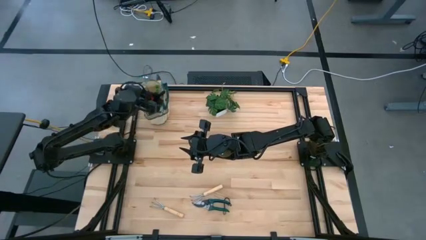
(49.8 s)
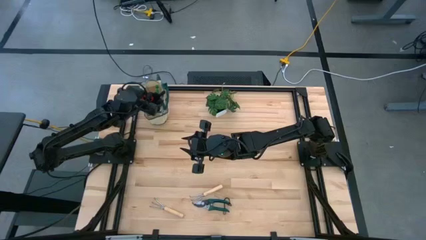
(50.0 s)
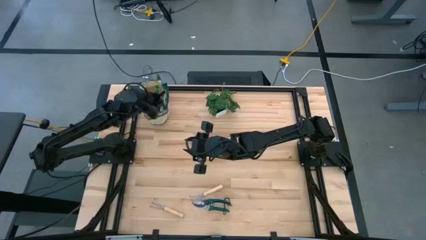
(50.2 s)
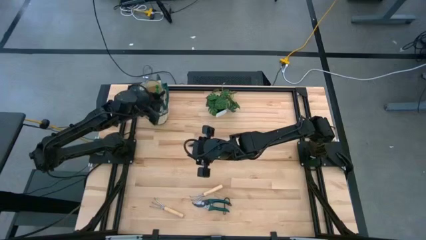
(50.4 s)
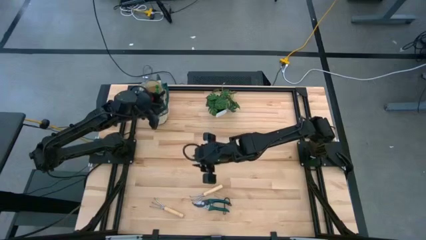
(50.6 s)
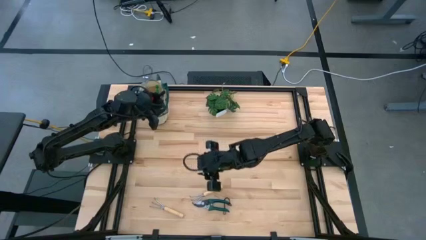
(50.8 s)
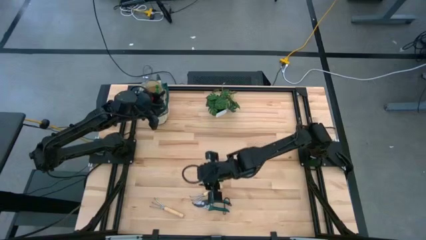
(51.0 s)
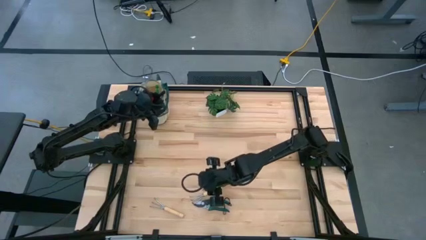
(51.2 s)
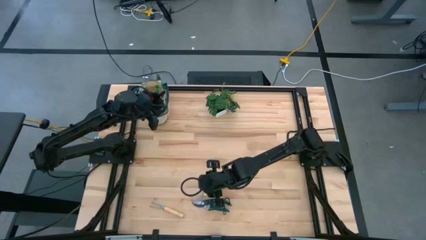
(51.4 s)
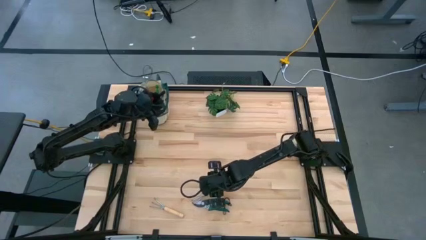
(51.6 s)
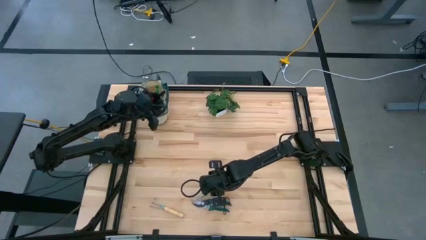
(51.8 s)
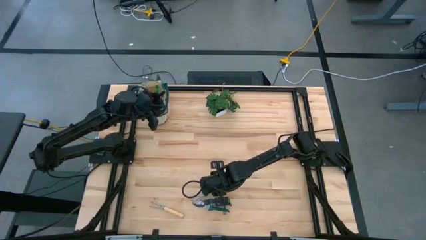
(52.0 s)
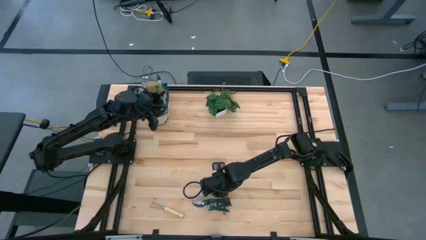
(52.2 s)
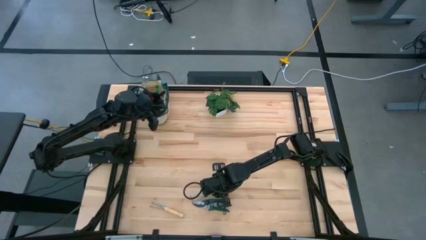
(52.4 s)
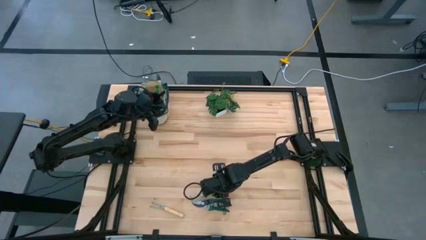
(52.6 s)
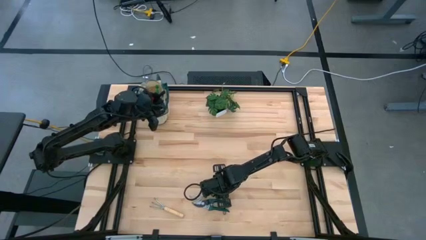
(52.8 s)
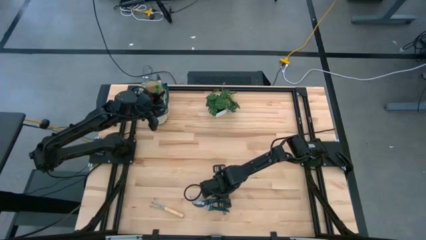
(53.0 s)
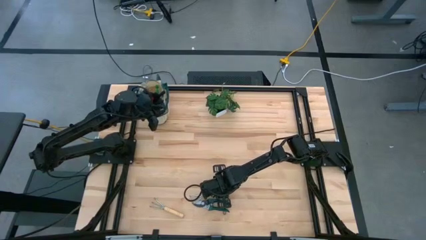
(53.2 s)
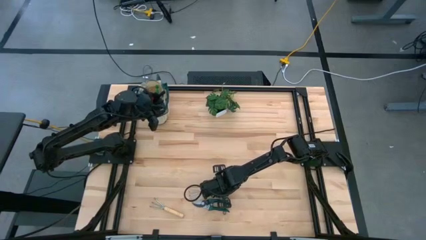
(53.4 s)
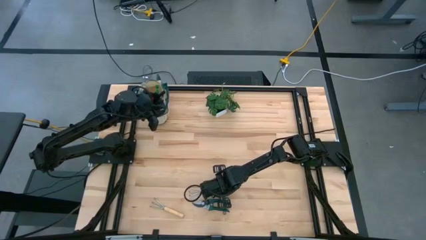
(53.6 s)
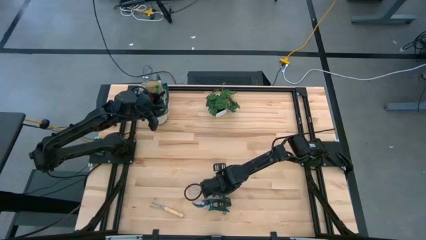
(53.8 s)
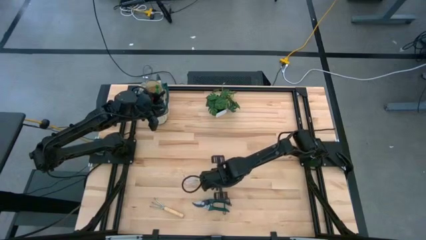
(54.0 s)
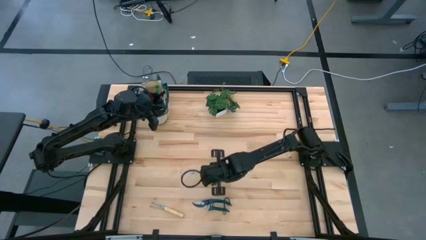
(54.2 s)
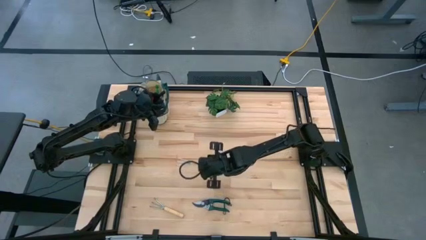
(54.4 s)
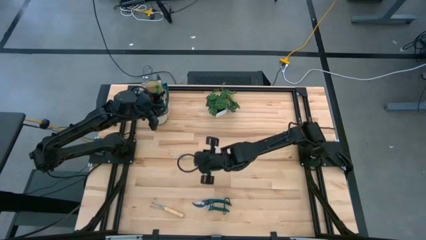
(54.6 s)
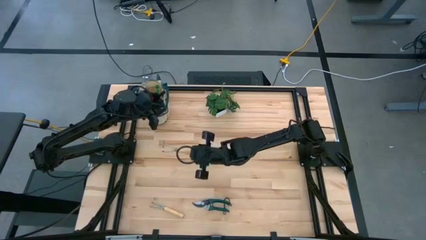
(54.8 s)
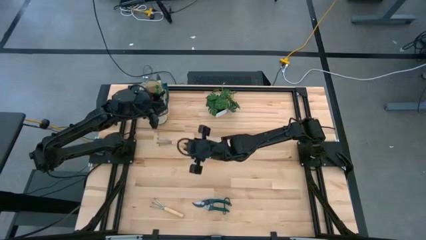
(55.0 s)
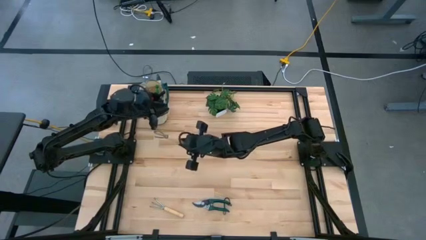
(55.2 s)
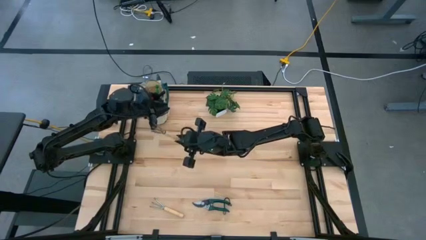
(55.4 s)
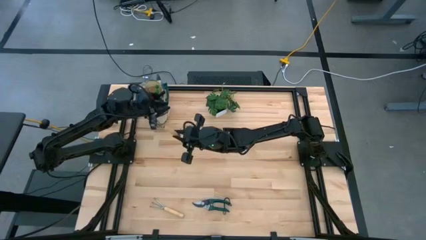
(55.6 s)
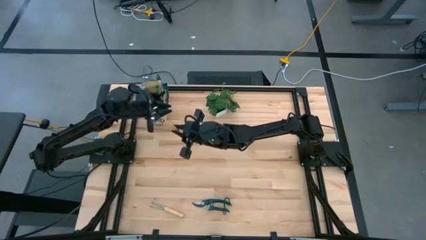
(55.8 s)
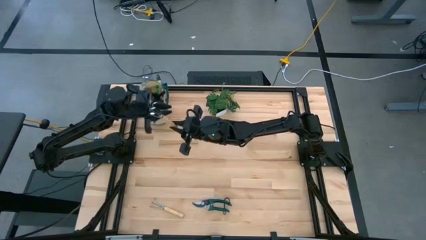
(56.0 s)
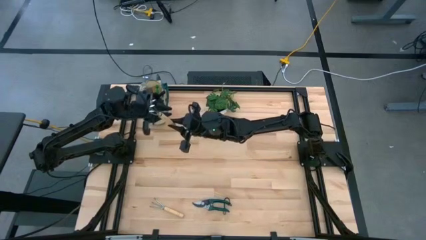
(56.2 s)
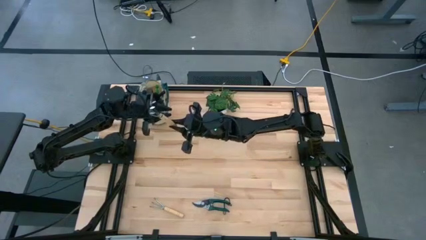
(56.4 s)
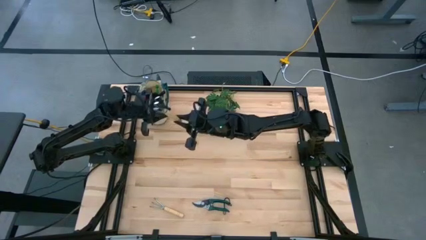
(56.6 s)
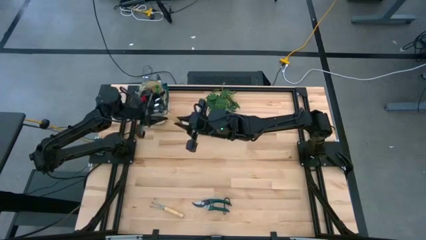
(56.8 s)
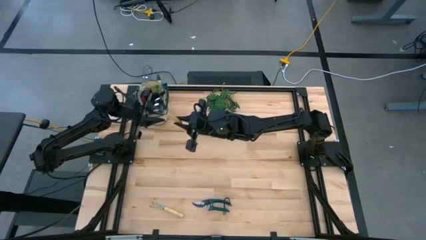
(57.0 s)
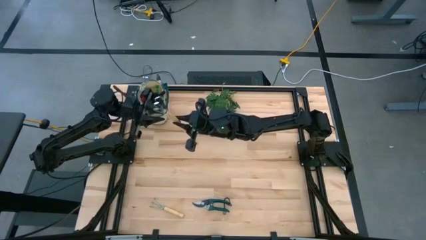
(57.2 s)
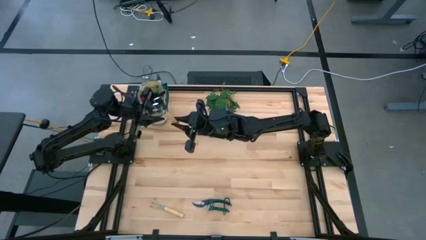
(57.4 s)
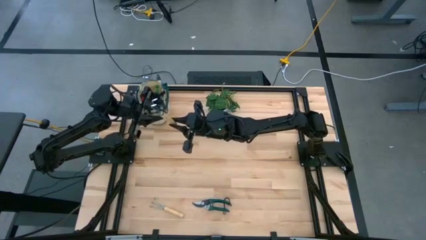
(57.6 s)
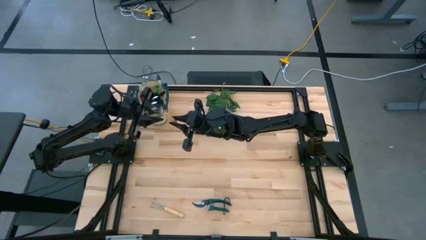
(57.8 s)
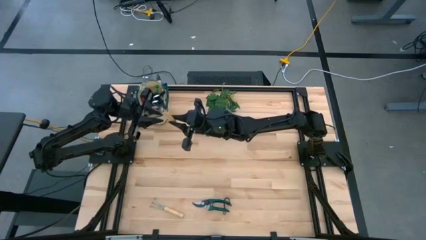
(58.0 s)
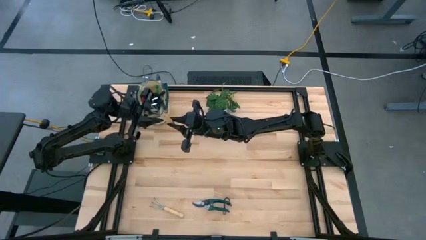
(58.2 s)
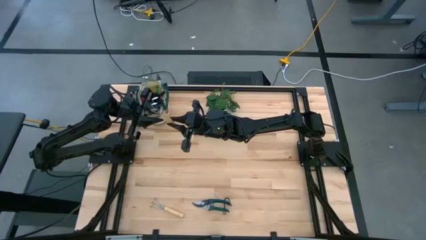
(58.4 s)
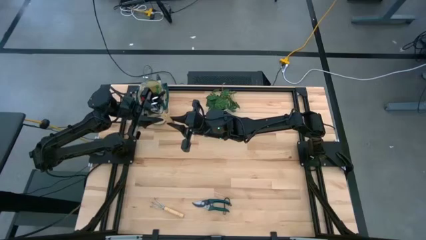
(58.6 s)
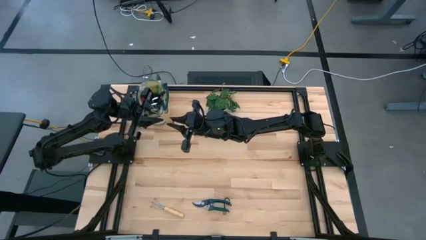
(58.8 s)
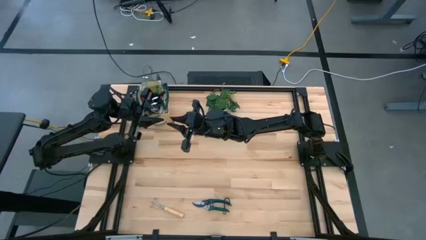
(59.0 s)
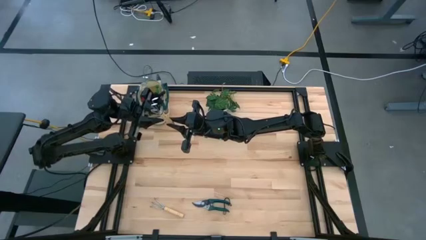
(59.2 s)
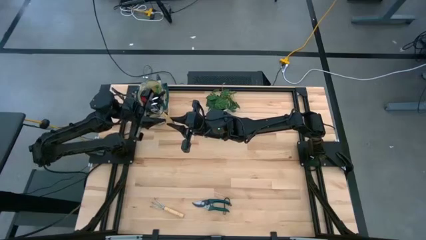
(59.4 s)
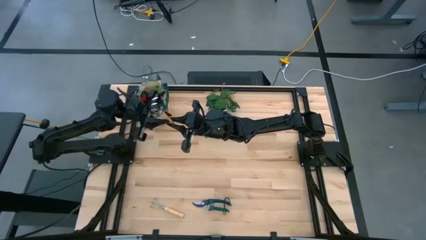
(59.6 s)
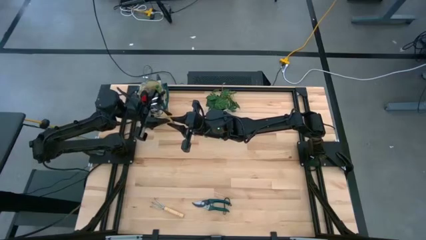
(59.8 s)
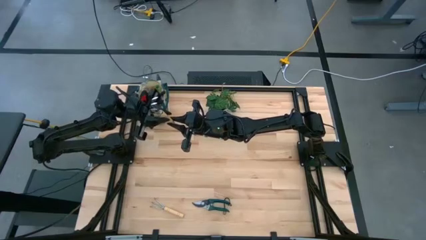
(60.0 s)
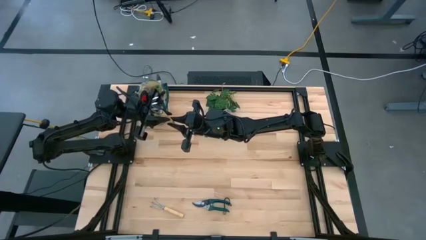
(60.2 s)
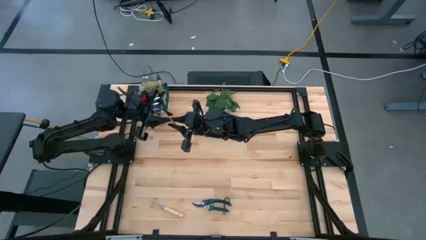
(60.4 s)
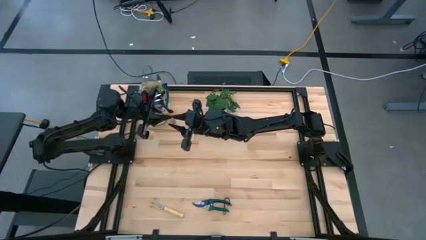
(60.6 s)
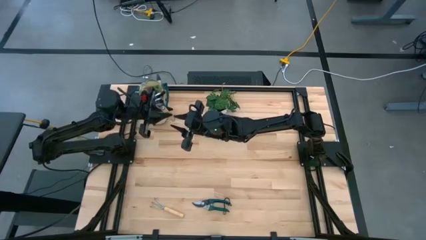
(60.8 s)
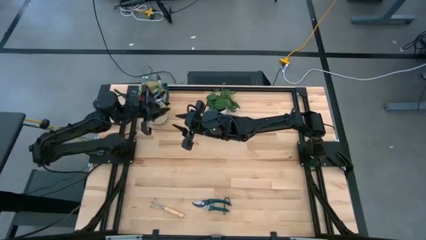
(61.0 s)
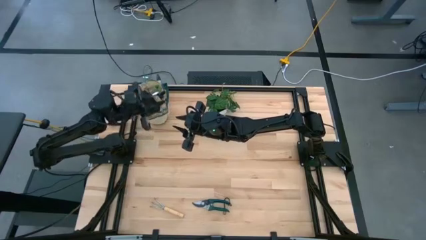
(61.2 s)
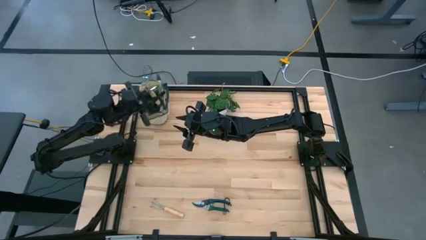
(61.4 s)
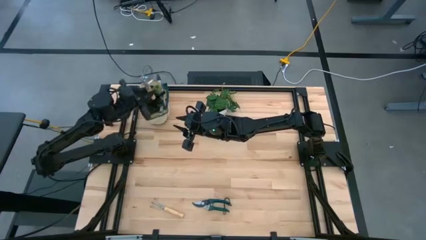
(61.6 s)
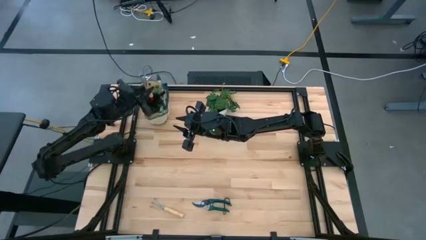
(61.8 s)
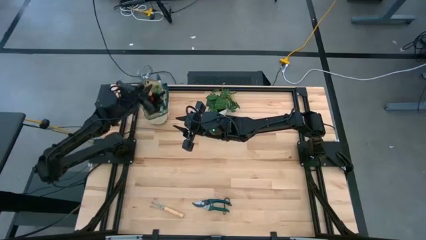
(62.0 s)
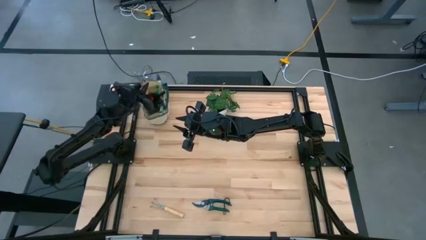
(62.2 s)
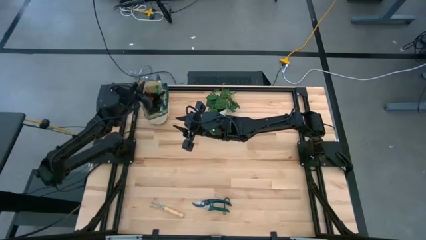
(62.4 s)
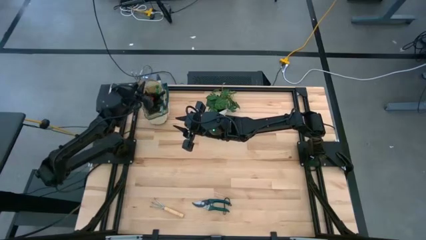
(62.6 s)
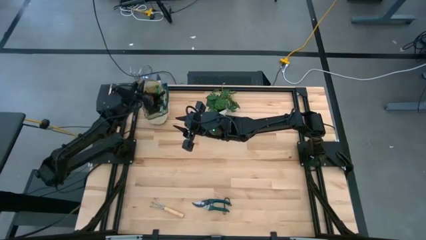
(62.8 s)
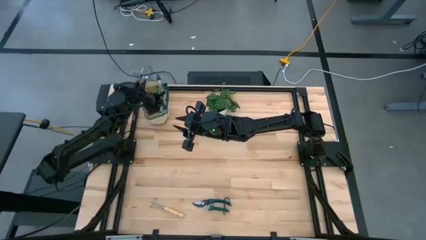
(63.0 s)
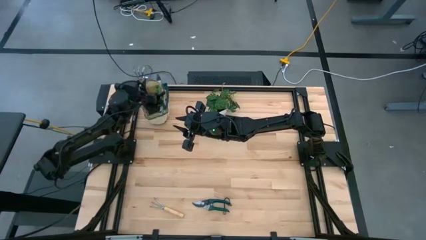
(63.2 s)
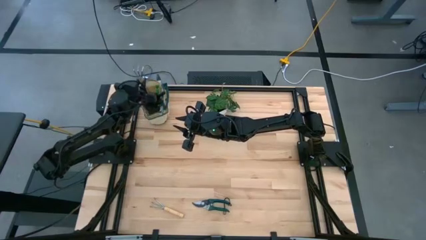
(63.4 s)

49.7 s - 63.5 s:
Task: Pick & Place Garden tools in Gardening bag
Put the right light brown hand rake into the green gardening bag

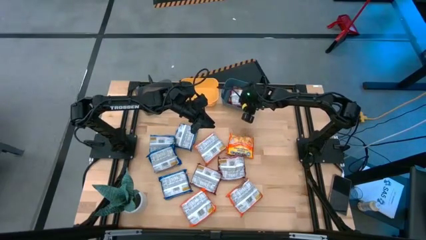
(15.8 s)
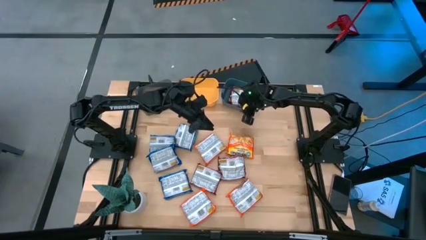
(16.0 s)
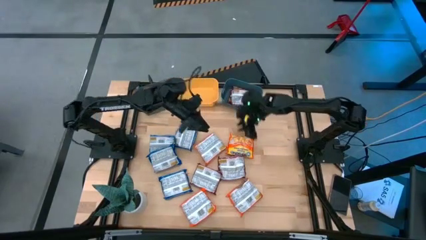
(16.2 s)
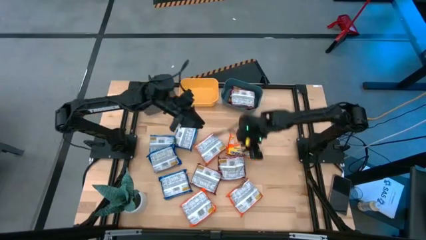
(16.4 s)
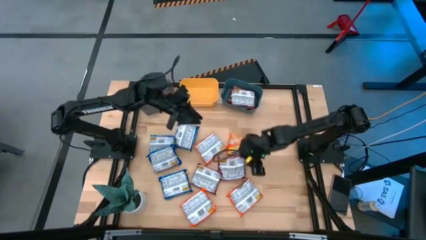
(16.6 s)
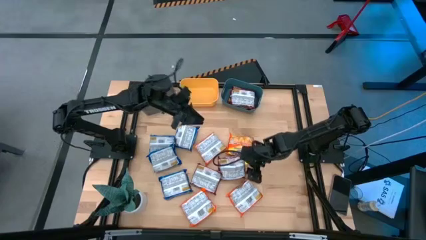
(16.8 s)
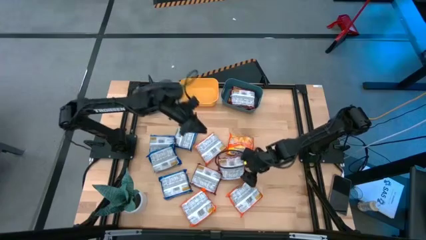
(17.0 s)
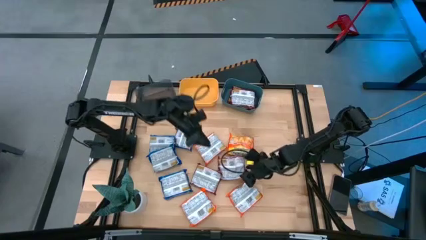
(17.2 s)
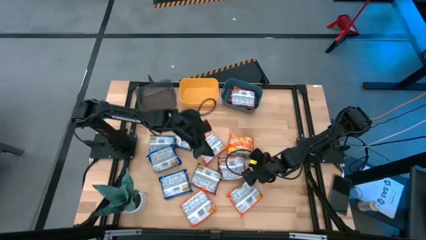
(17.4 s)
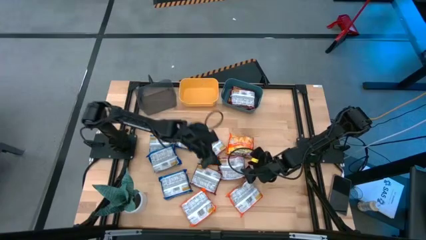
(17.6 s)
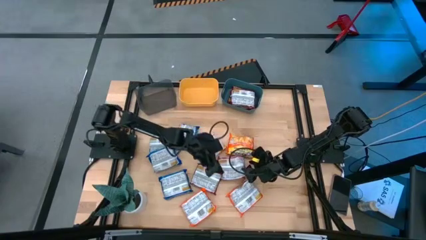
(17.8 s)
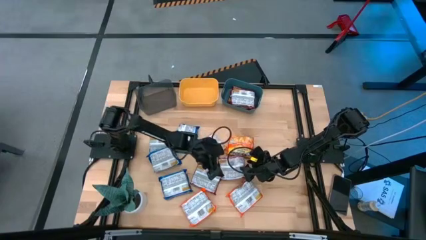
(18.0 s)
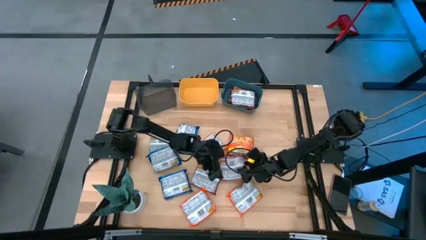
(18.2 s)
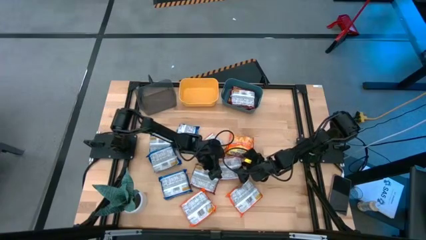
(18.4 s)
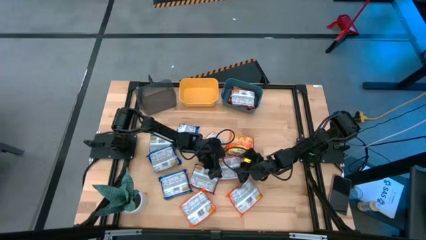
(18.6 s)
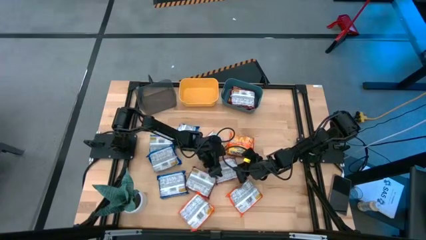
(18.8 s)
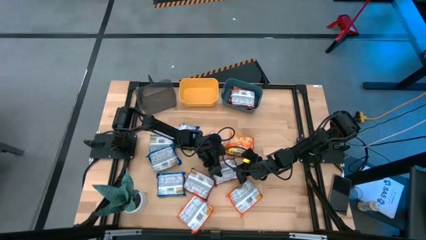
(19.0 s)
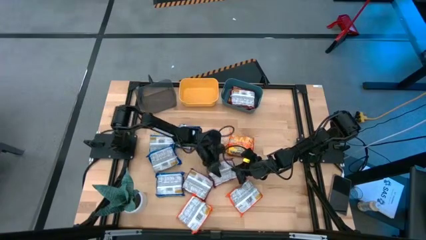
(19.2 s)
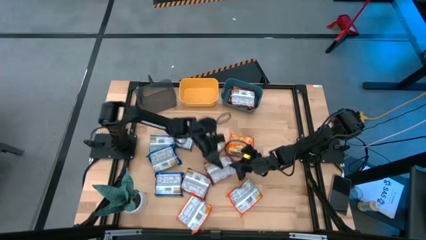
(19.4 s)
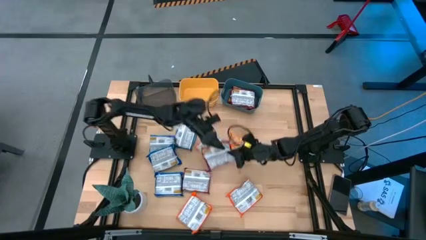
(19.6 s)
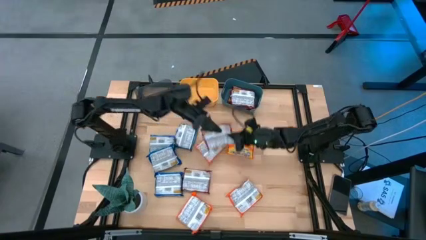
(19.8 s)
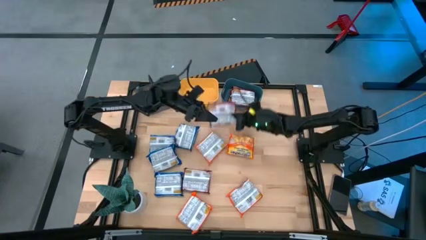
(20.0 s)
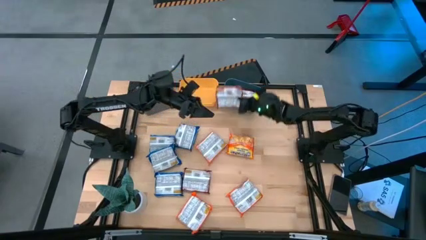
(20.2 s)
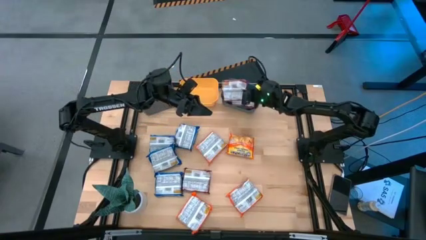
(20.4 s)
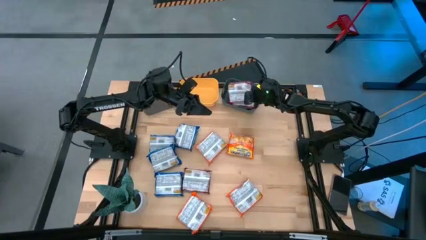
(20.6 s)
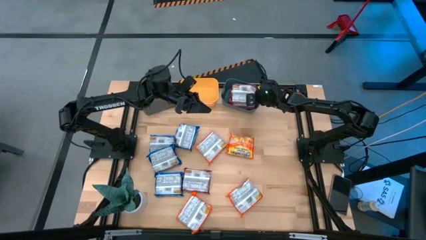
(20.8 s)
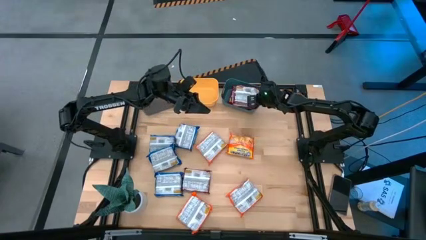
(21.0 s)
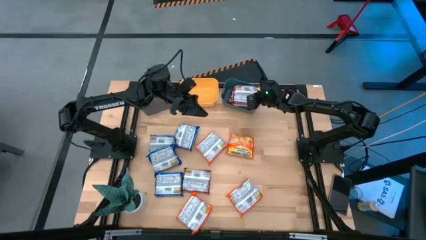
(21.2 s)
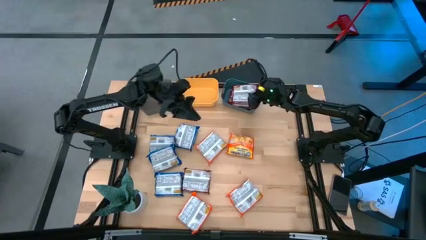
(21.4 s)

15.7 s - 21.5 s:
Task: Sort Maruchan noodles
Put the red noodle pack into the blue bin
